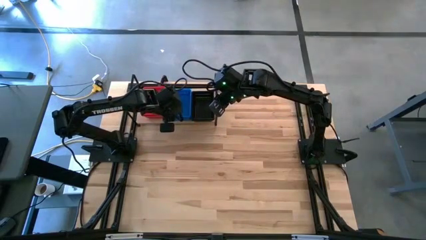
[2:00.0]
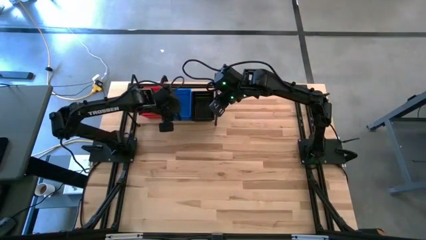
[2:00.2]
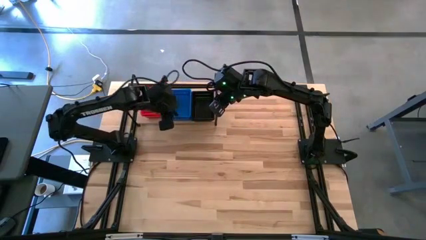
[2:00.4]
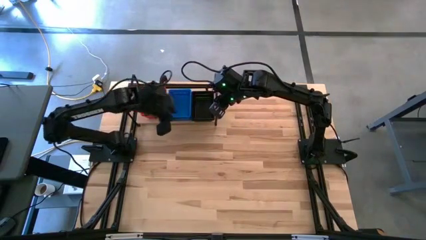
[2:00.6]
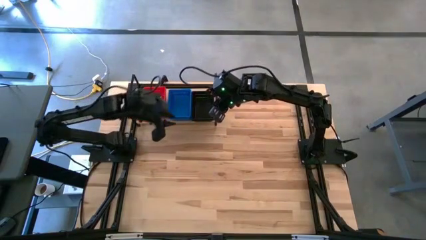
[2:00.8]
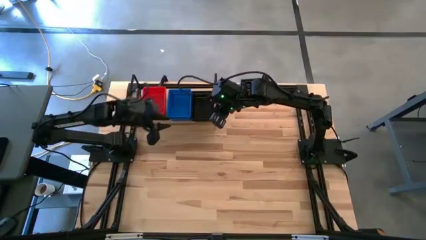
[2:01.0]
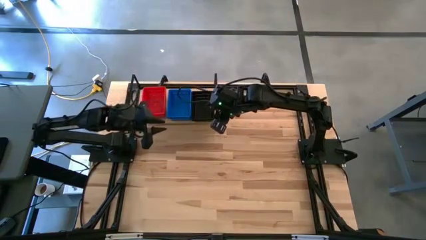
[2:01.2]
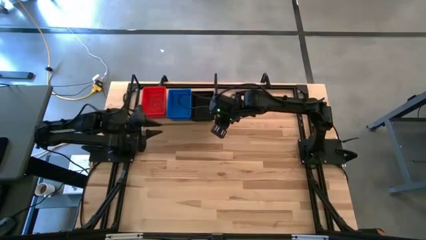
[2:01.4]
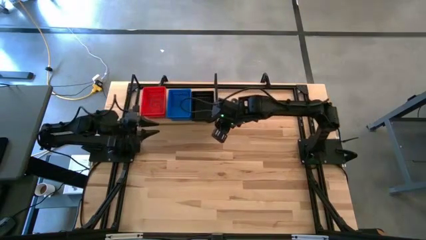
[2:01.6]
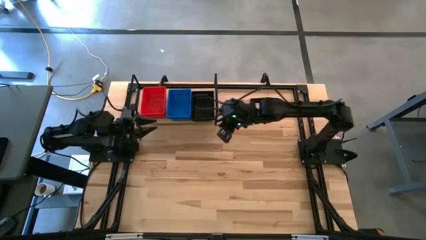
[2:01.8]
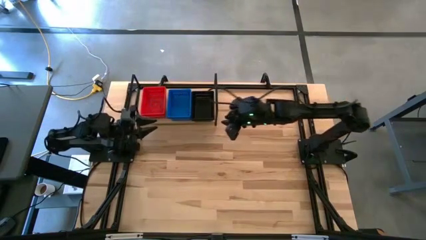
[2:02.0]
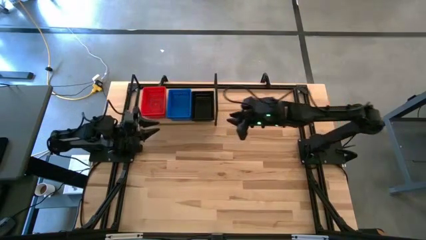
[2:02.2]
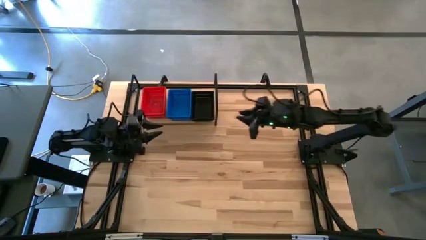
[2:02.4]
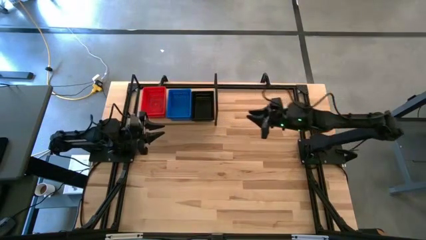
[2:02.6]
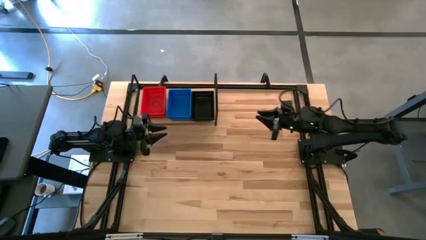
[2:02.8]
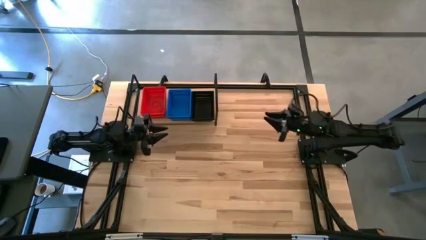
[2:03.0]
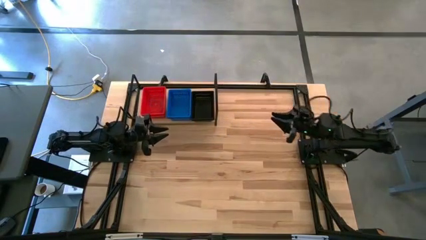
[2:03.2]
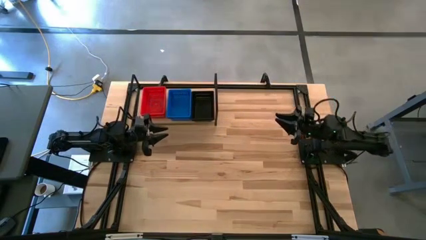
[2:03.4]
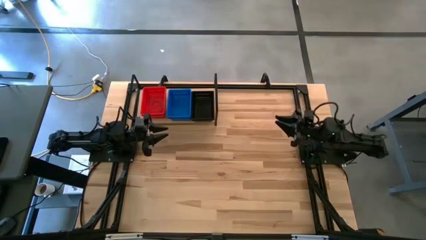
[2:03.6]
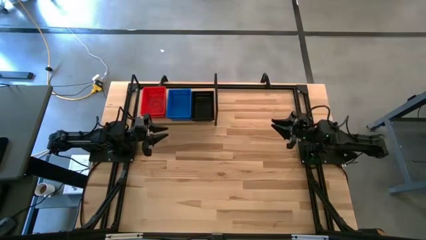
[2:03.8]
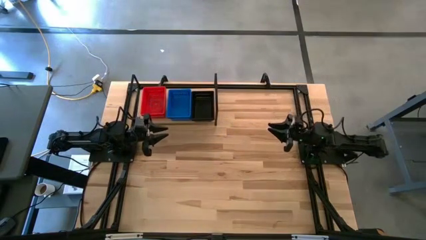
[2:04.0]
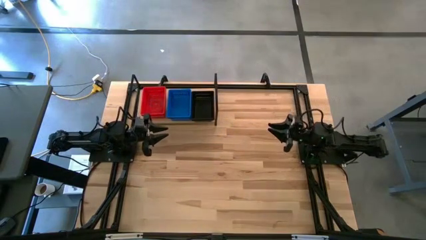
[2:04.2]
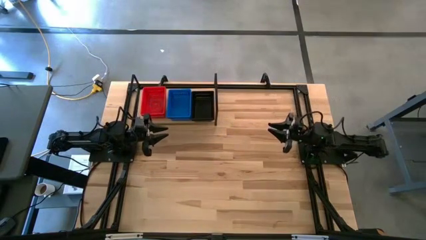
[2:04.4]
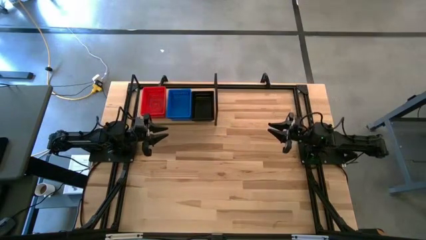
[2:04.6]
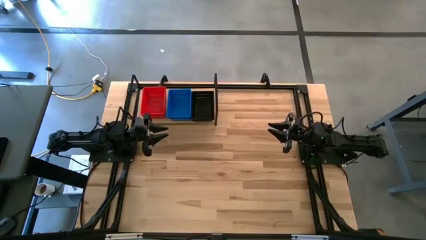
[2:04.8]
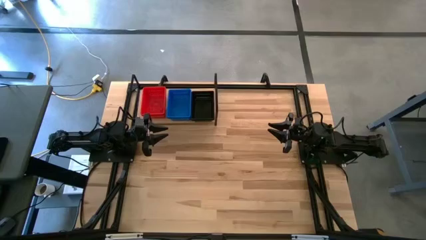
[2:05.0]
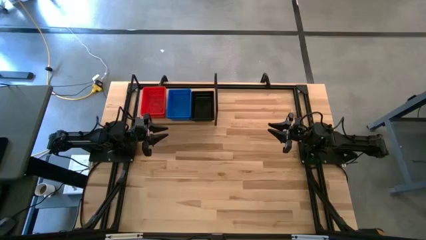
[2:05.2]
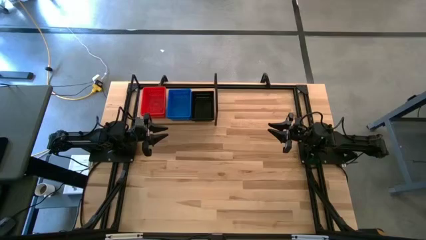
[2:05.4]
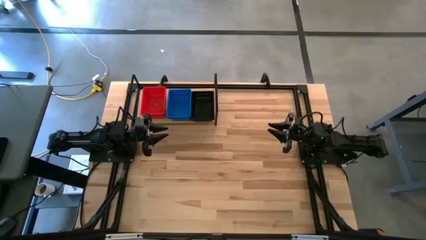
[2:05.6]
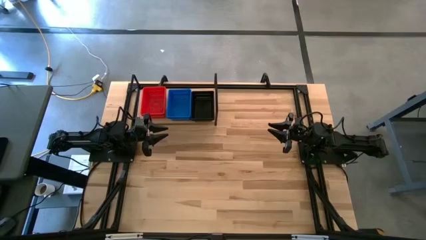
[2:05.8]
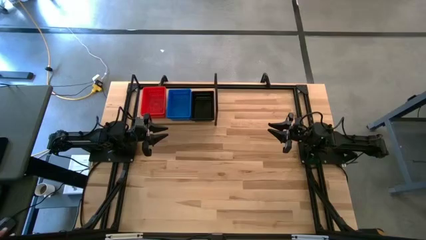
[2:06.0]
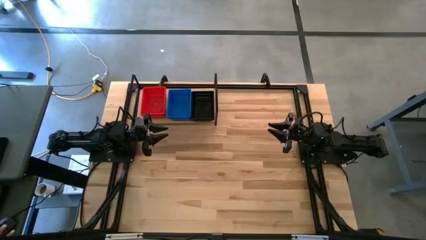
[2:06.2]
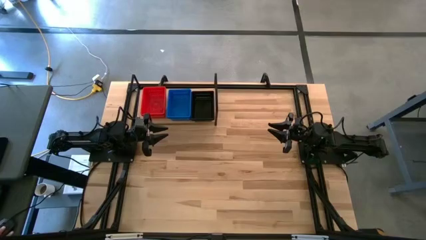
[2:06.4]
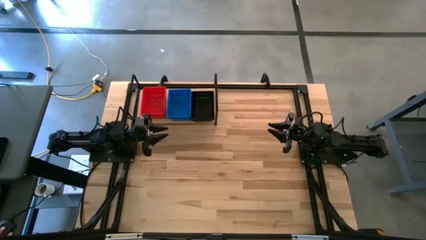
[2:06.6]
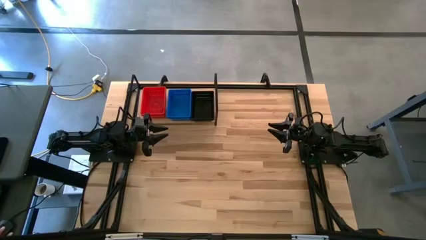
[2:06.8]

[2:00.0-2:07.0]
Task: Stack baskets on shelf by color
Return to Home Position

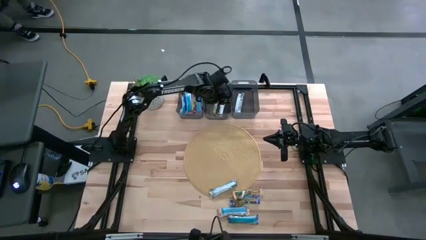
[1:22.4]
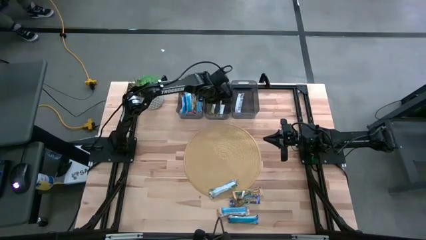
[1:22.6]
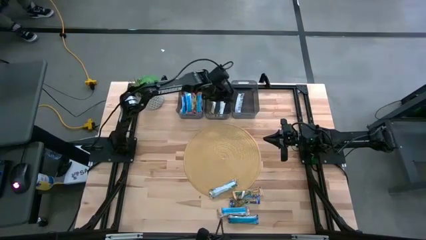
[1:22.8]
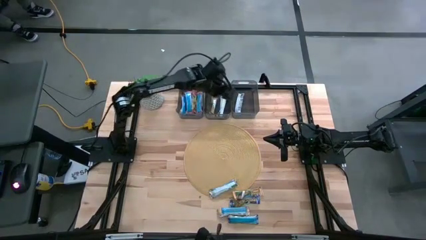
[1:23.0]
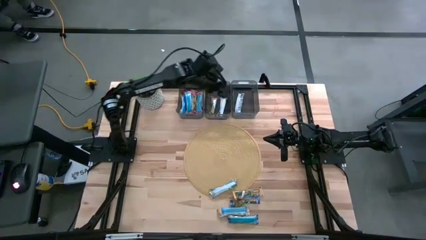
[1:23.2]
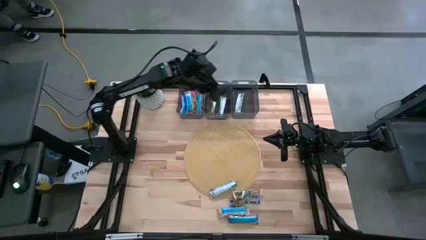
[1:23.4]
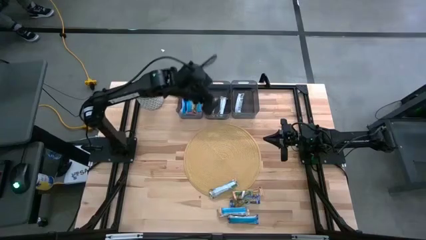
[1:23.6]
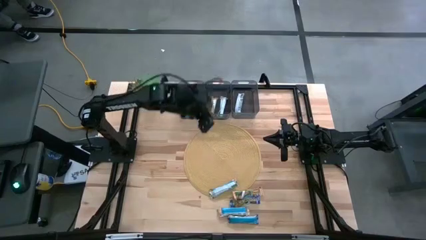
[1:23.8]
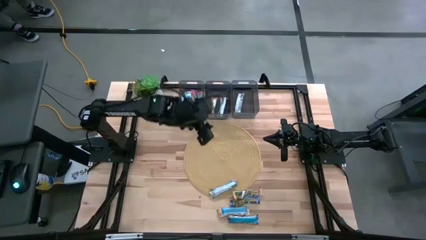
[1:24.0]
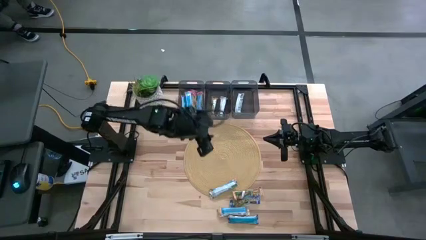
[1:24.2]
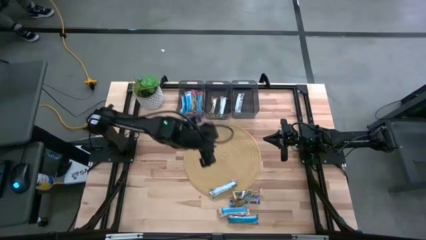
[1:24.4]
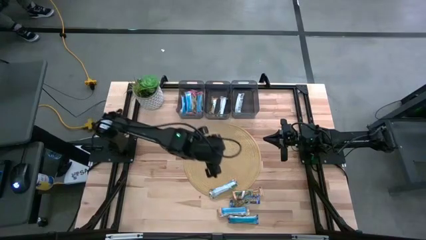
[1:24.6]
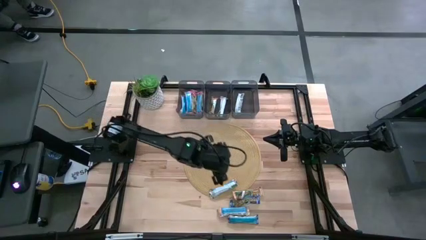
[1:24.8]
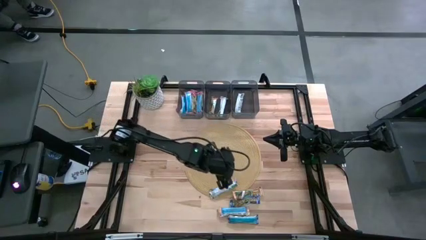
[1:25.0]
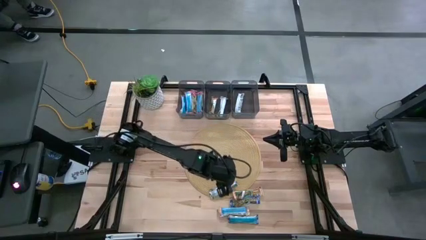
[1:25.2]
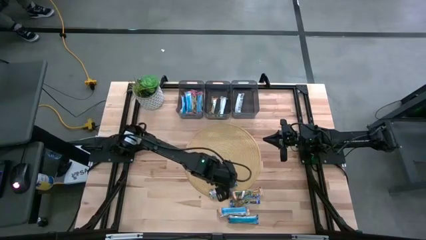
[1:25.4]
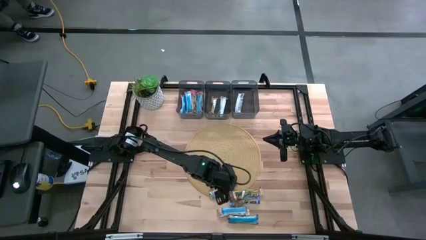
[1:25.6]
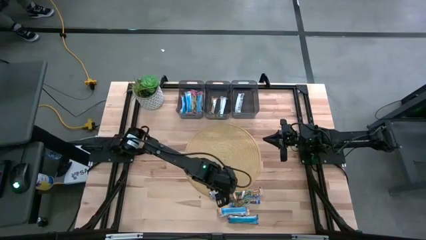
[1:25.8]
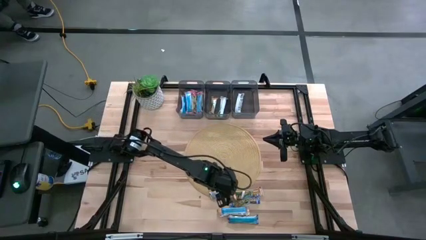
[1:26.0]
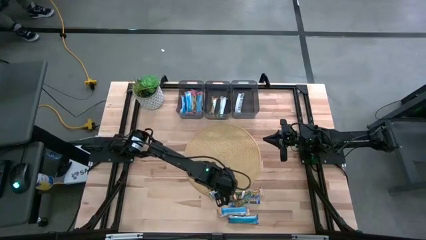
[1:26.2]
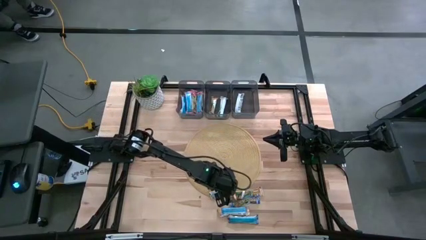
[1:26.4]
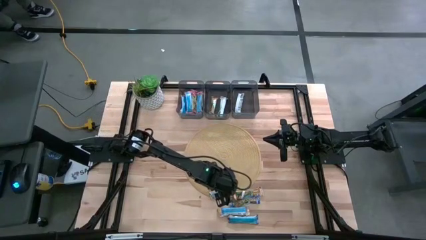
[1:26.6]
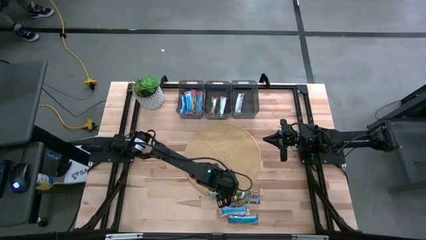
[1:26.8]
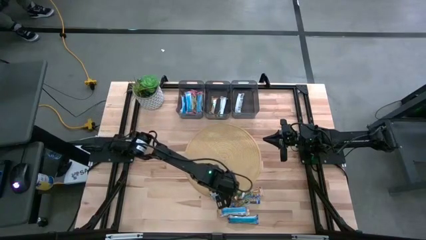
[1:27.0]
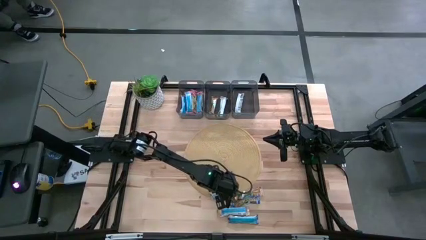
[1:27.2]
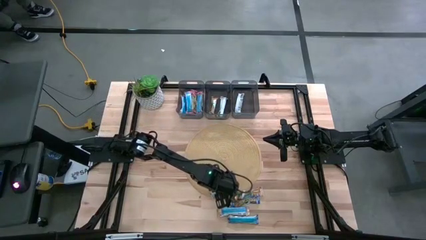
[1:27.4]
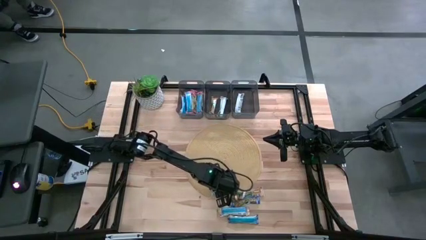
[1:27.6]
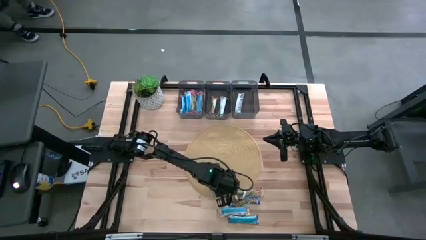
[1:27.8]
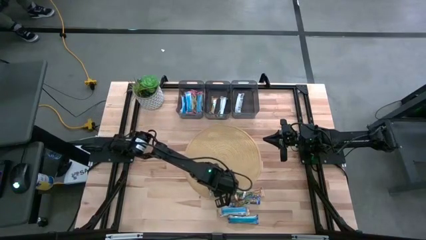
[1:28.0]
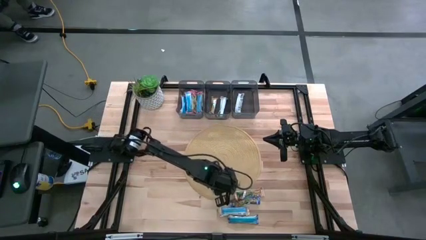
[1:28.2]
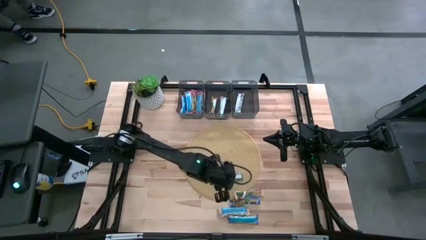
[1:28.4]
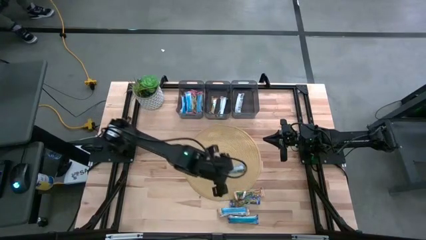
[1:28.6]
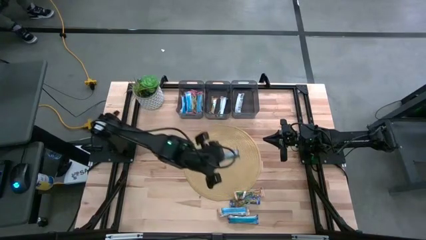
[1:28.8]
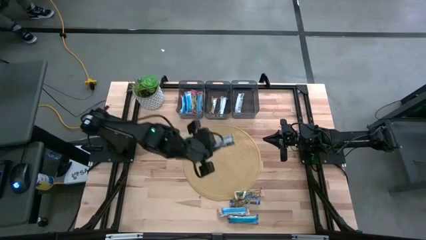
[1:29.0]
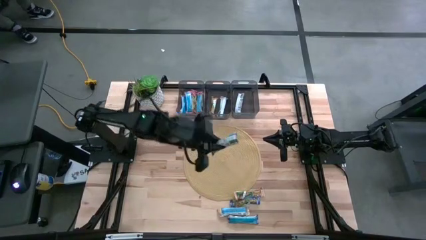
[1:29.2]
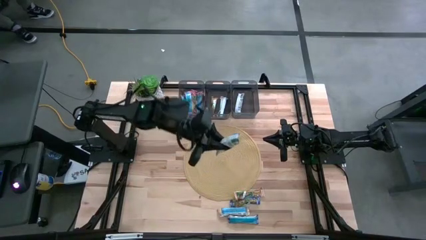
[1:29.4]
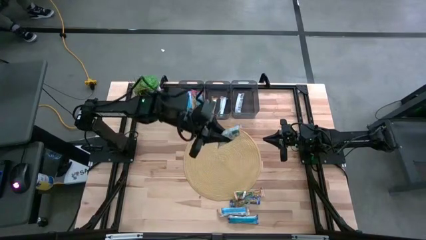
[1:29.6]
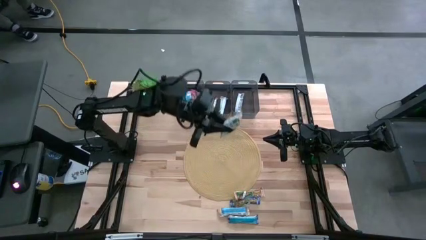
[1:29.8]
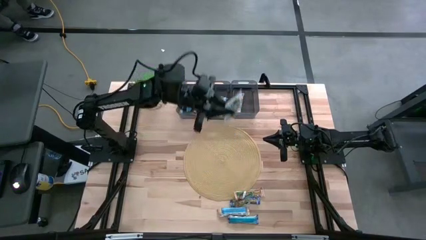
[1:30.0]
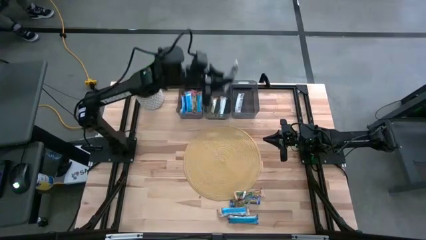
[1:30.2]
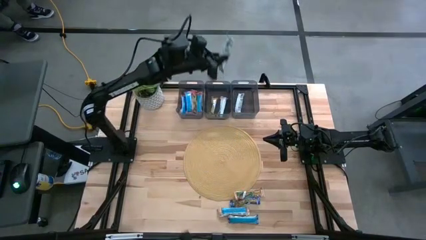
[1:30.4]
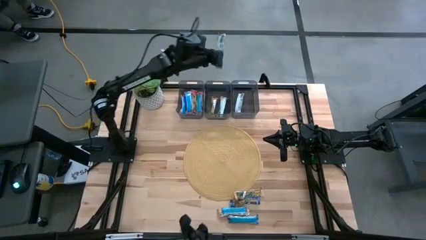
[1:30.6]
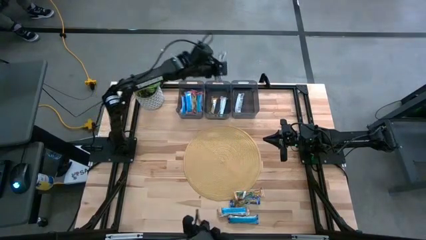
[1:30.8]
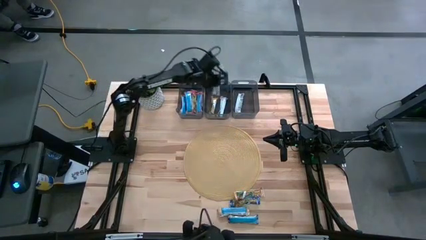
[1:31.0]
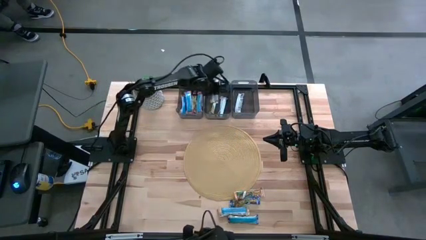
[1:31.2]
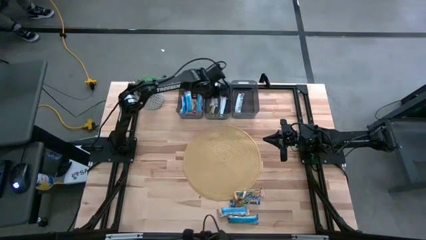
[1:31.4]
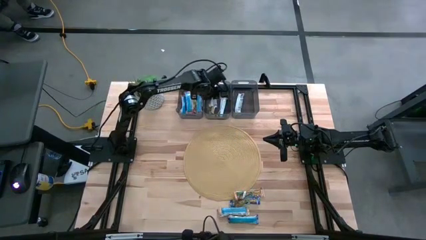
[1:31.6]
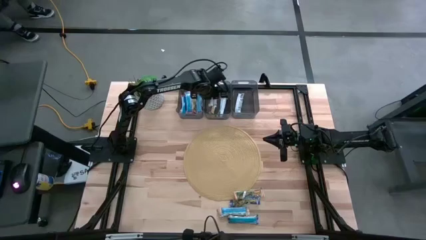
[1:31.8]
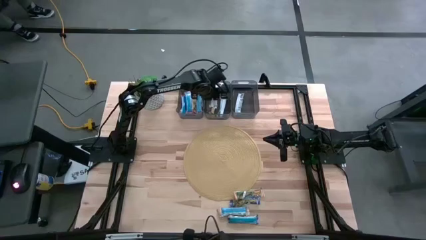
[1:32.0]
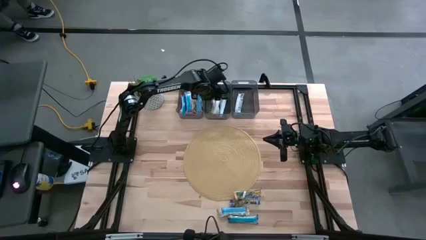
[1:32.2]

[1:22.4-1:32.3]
Task: Pick and place Granola Bars by type
Put the orange granola bar into the center black bin
